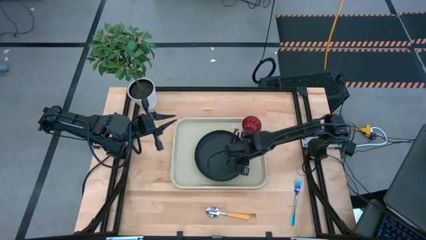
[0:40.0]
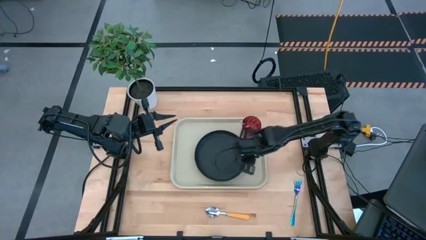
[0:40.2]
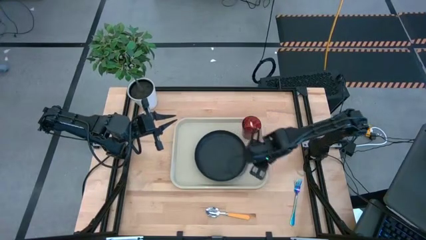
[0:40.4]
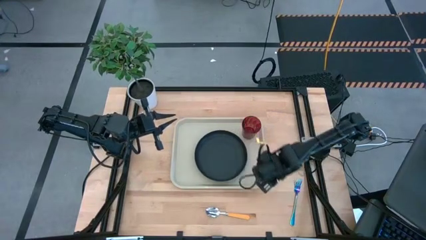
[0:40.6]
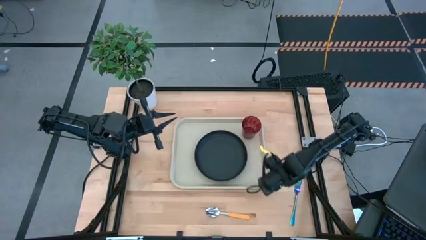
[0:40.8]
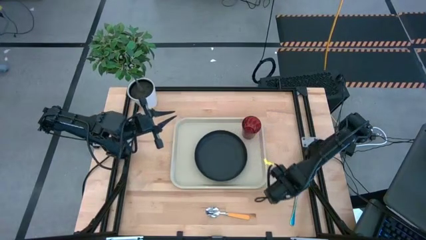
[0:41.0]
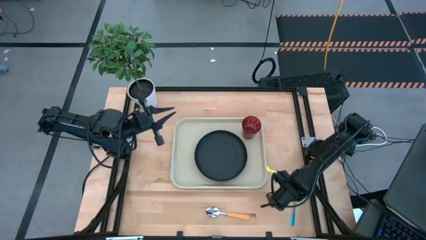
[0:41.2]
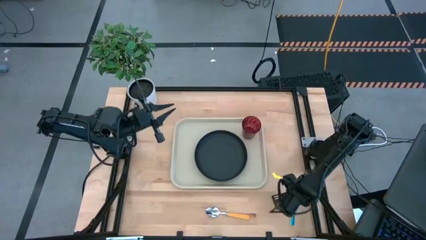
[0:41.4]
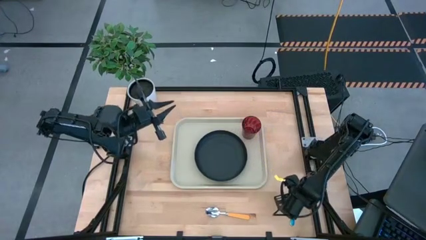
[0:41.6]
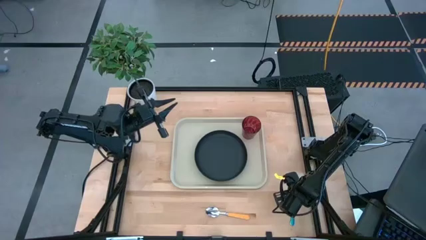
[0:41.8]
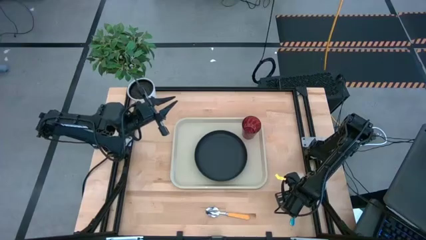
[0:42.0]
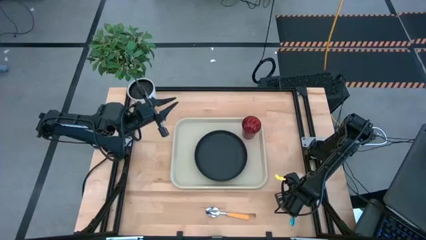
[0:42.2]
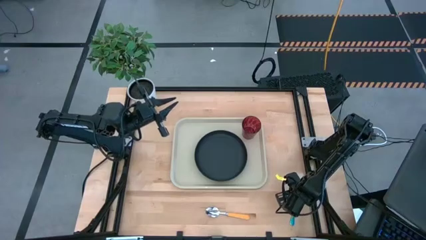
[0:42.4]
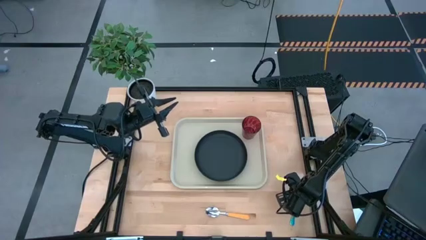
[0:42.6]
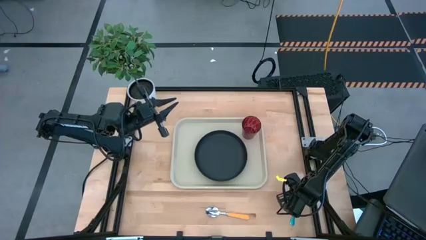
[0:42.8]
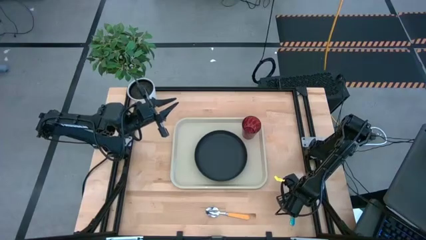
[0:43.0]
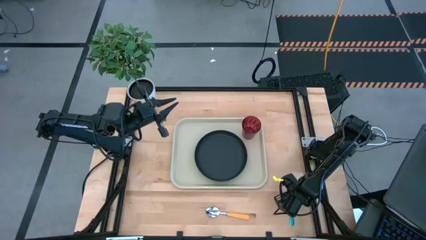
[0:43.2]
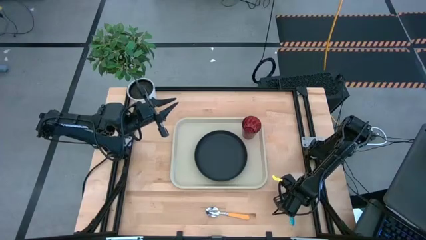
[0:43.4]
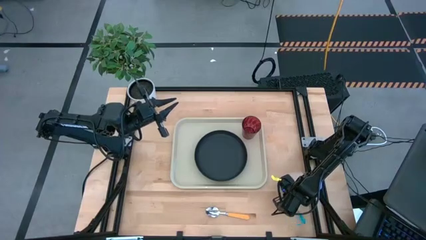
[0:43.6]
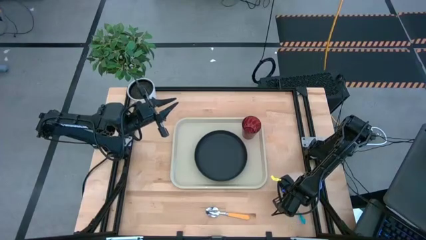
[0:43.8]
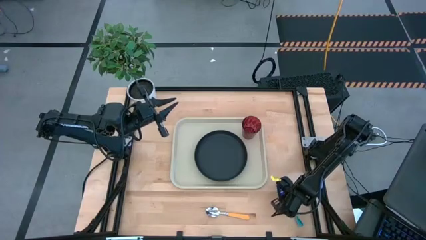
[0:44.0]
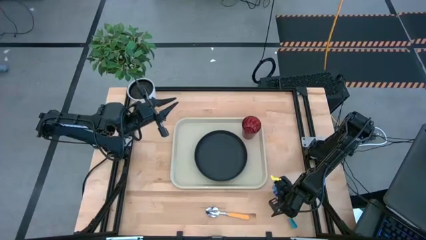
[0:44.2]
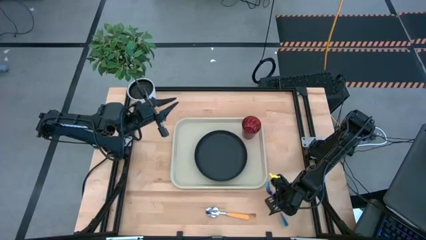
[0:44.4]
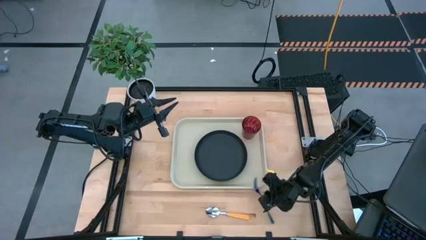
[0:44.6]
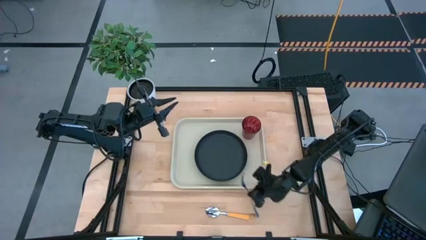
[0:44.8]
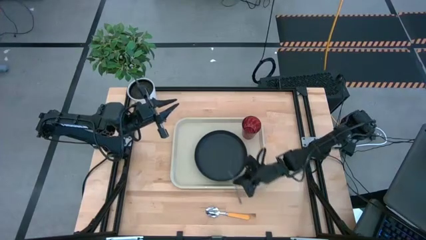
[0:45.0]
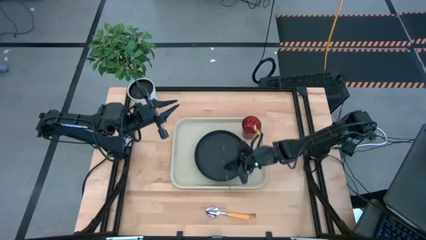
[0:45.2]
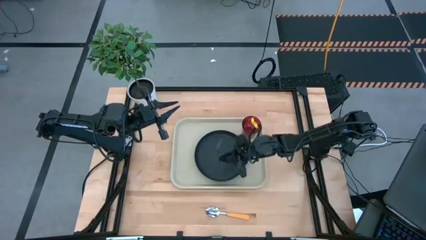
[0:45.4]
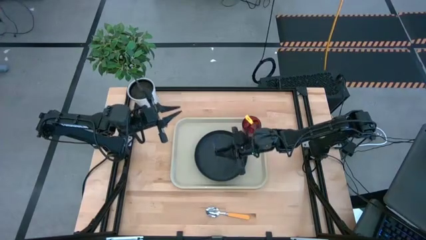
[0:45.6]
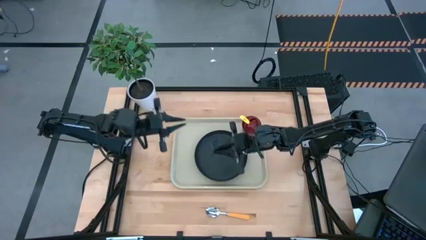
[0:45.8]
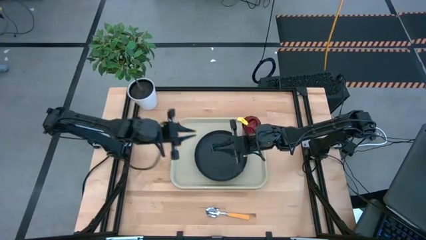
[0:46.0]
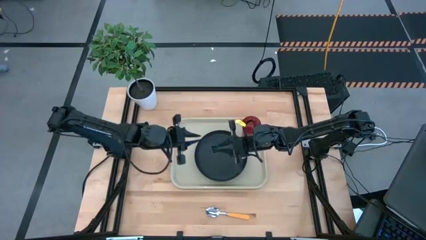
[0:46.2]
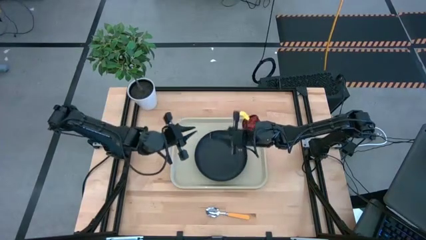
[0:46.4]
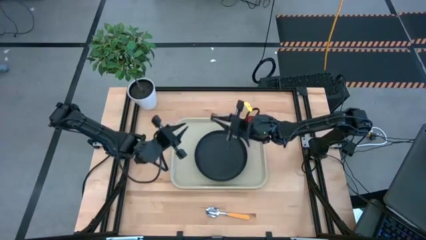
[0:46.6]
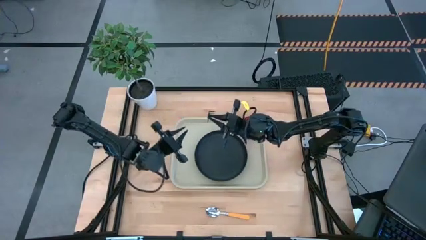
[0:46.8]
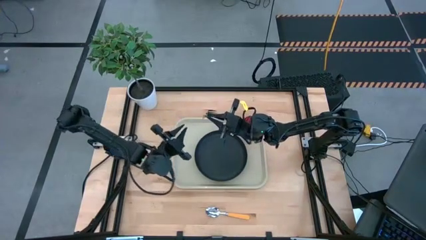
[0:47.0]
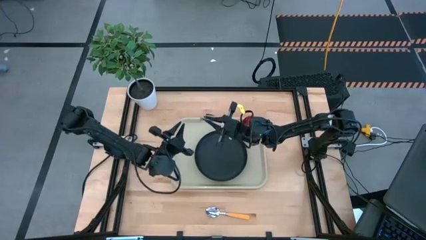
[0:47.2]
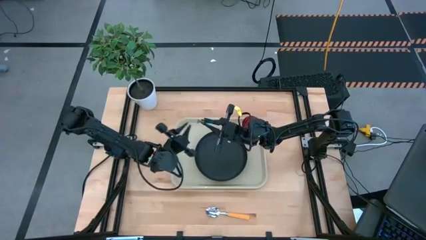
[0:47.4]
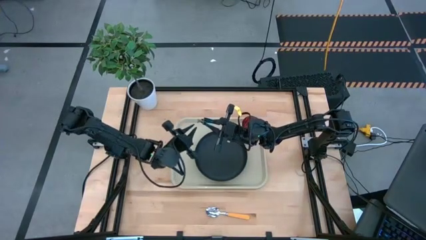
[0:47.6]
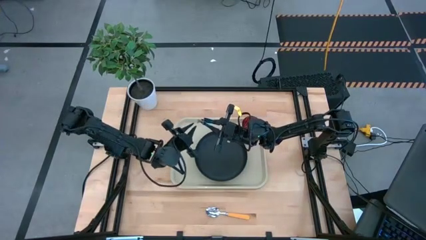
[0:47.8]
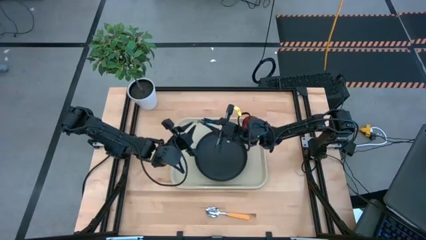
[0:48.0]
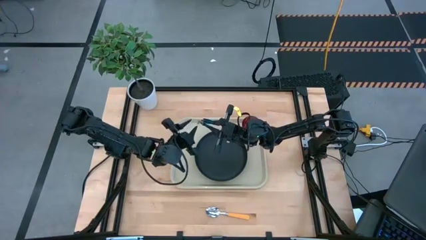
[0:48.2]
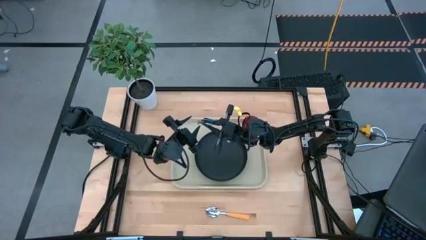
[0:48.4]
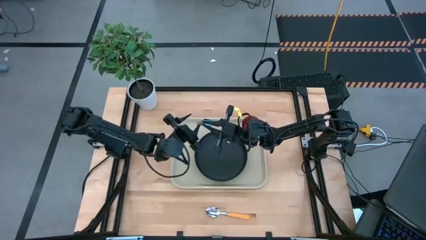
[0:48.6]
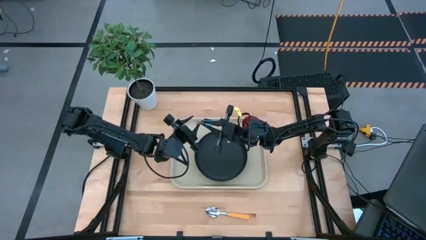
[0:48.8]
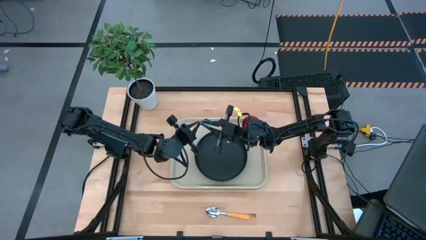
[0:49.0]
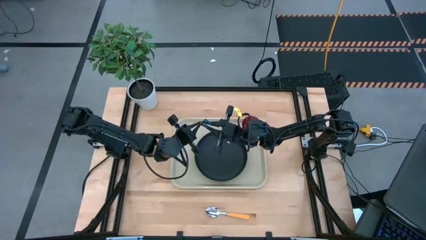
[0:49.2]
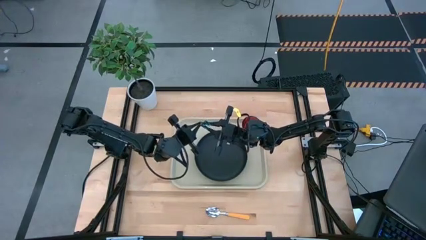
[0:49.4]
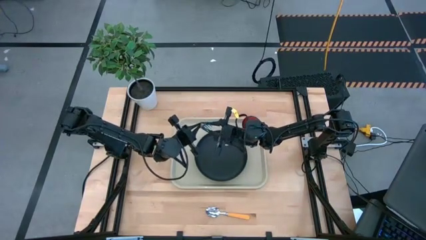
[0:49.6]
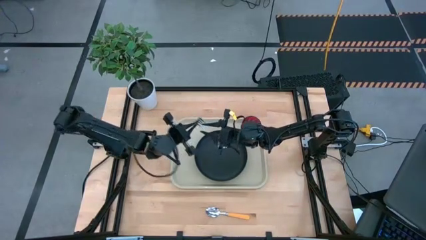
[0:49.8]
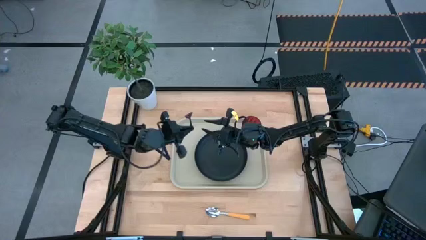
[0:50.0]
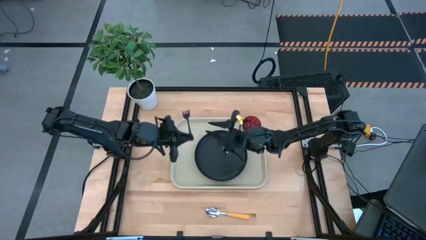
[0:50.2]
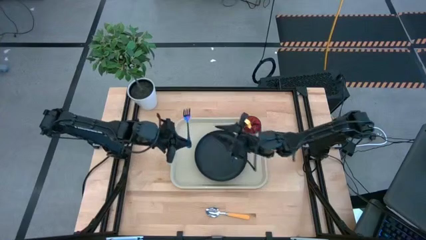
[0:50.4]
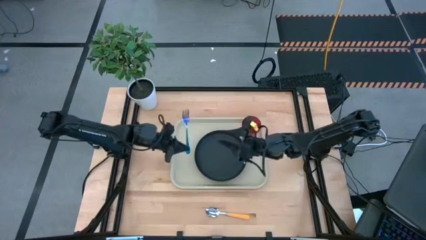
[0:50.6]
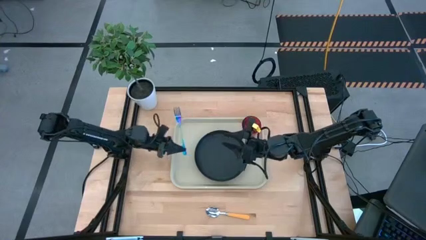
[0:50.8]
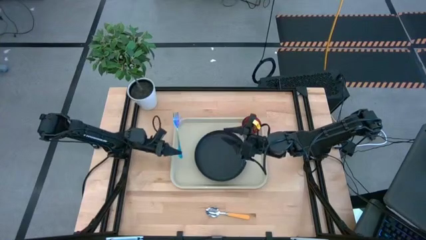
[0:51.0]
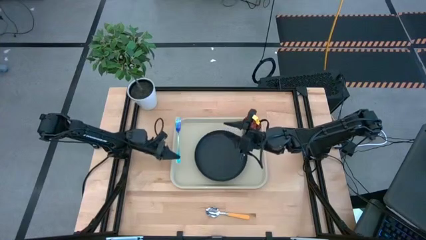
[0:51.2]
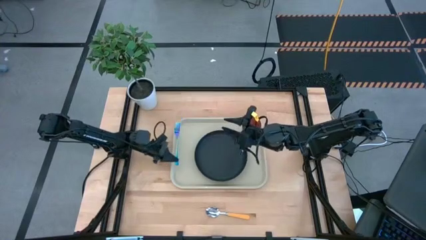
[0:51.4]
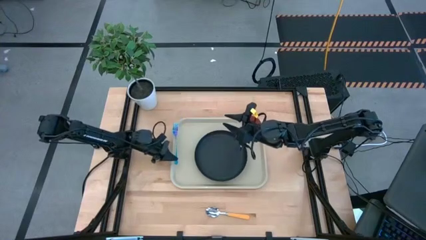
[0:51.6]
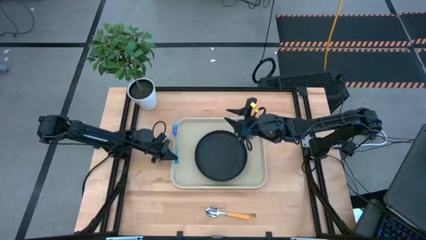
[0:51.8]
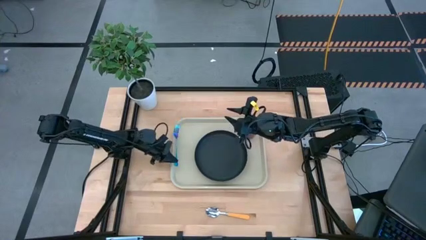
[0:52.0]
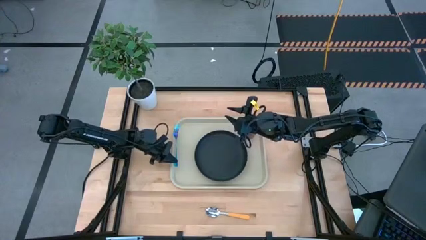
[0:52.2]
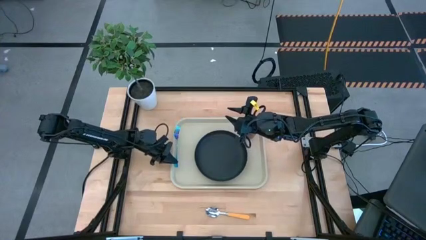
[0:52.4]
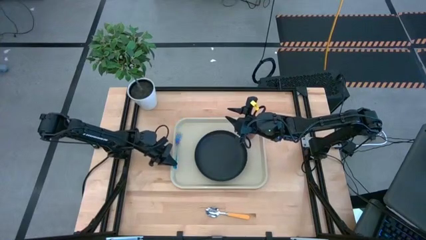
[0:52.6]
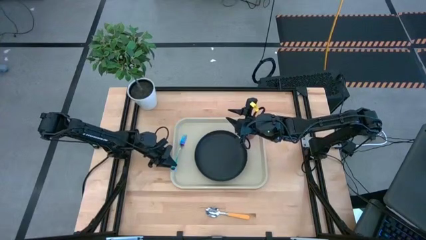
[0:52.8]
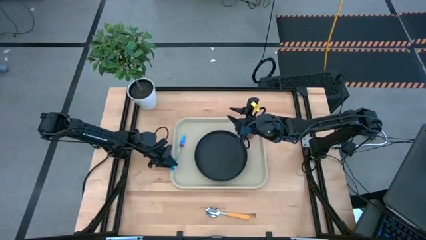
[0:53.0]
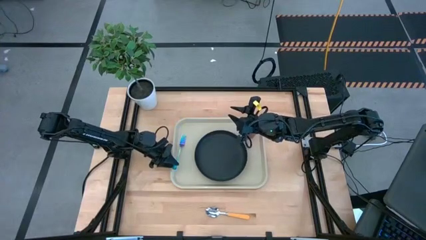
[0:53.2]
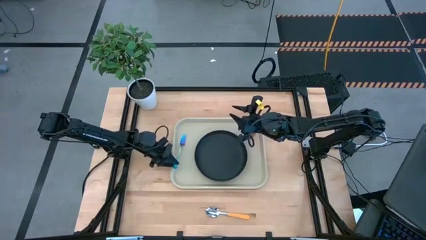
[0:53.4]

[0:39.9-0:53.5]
Task: Pick and place plate/cup/fork/spoon on tray
Put the blue fork on the gray tray to the left of the black plate

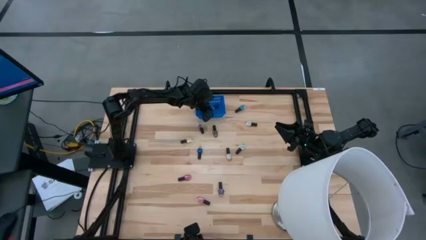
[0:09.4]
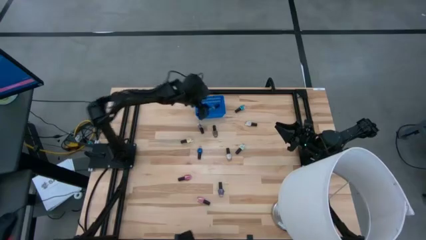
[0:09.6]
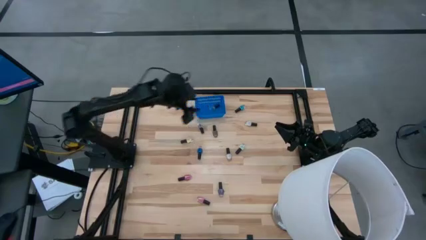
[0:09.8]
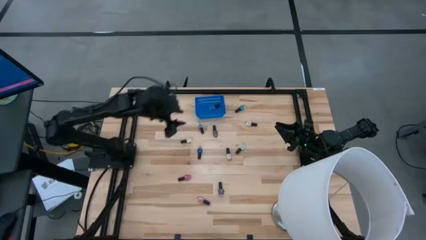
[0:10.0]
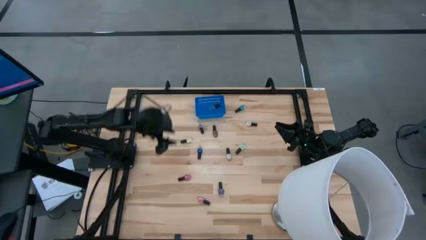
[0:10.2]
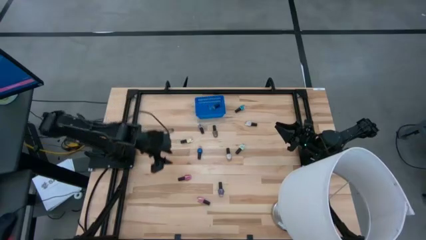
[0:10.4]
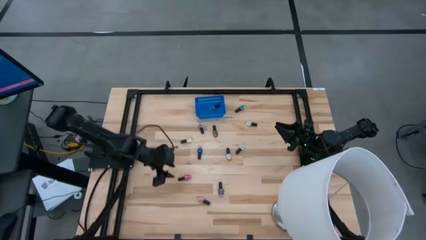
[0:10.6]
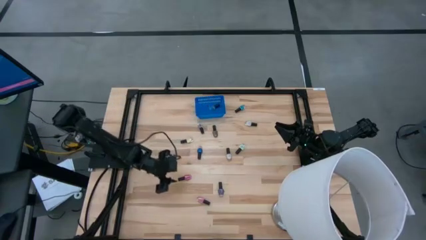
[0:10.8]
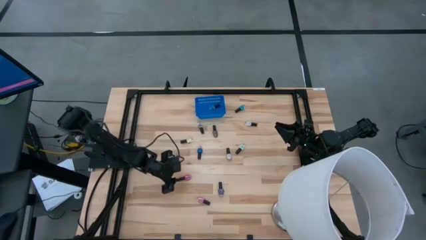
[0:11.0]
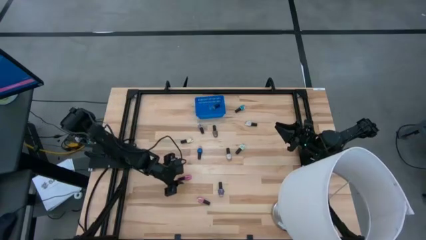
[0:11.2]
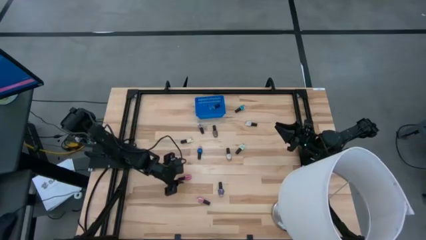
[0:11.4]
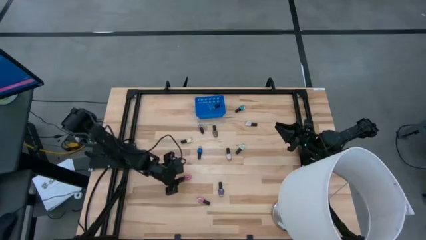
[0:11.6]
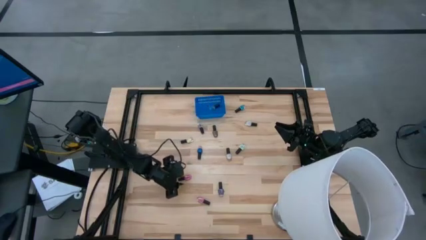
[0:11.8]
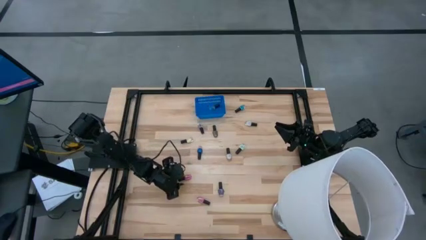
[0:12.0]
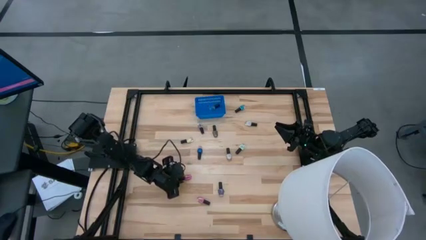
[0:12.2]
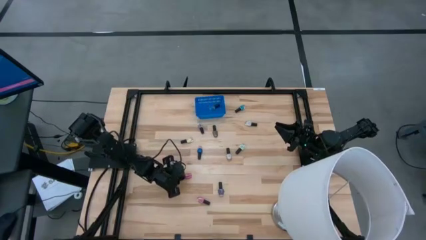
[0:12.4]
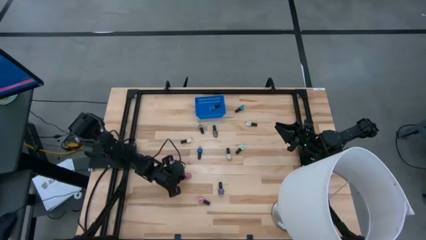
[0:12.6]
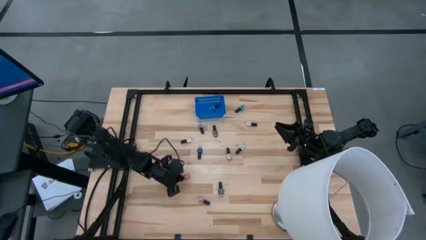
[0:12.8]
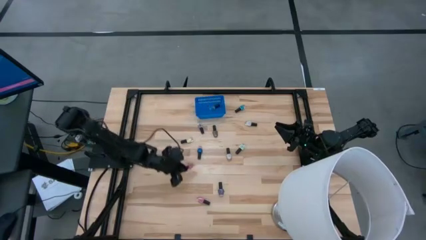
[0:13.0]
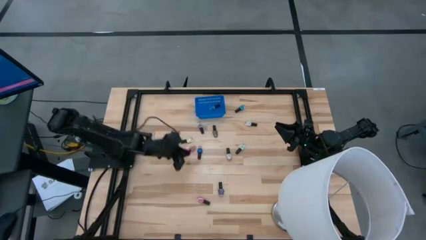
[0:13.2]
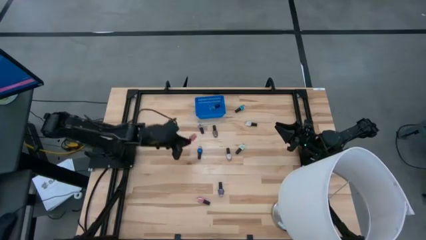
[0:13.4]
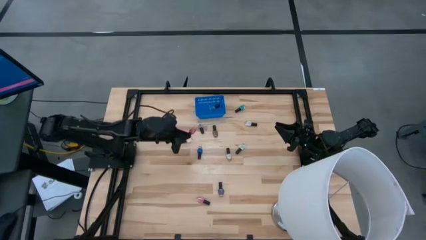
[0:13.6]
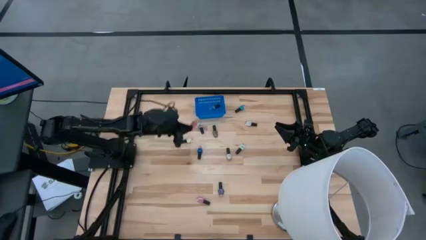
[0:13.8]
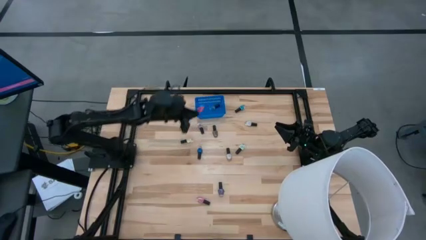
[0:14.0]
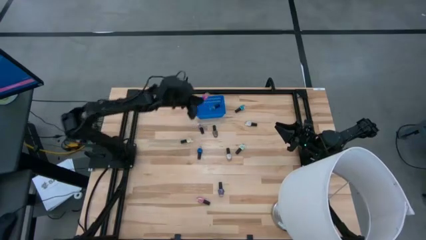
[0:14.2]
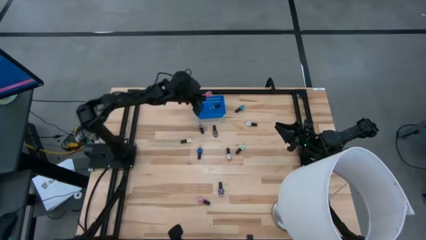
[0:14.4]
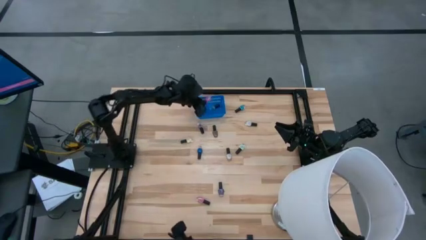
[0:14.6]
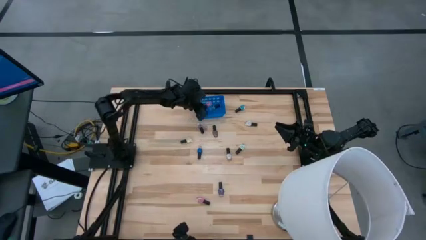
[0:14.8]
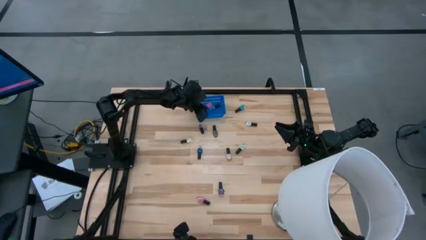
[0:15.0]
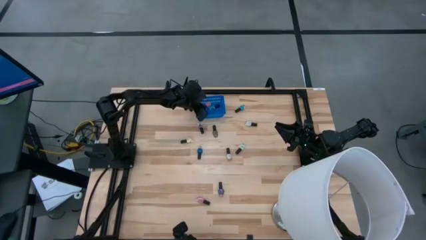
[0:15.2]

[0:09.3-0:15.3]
Task: Pick & Place Nail Polish
Put the dark pink nail polish bottle into the blue basket
